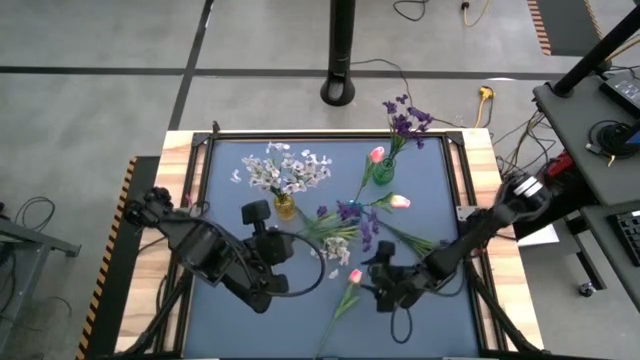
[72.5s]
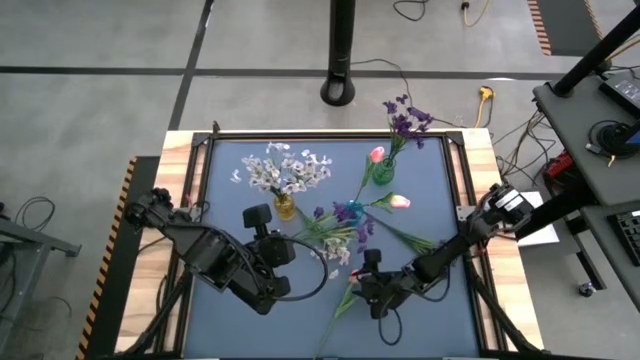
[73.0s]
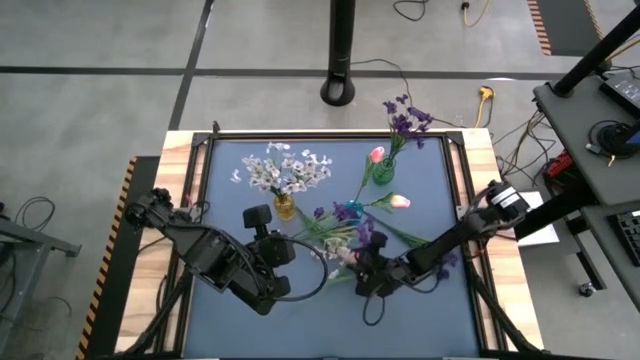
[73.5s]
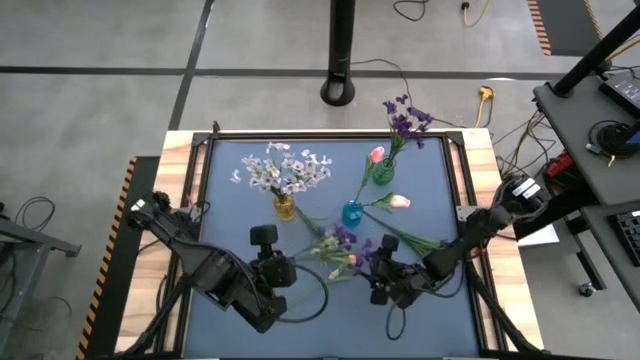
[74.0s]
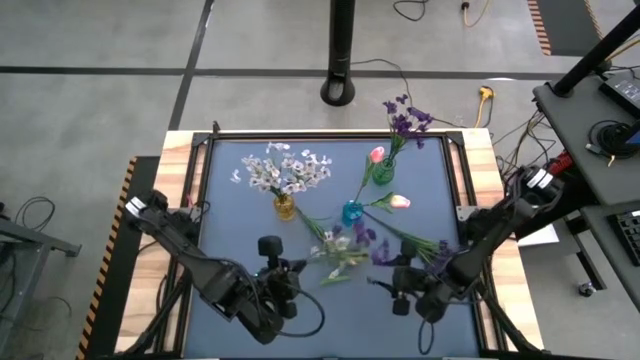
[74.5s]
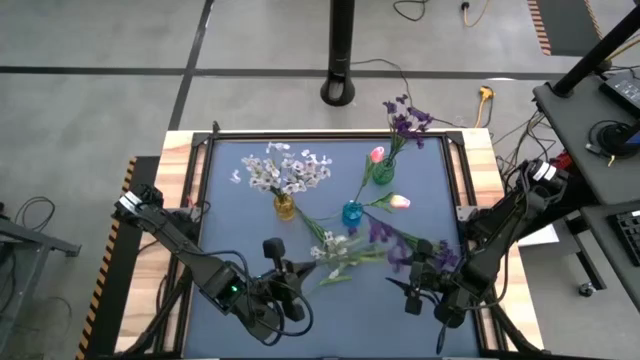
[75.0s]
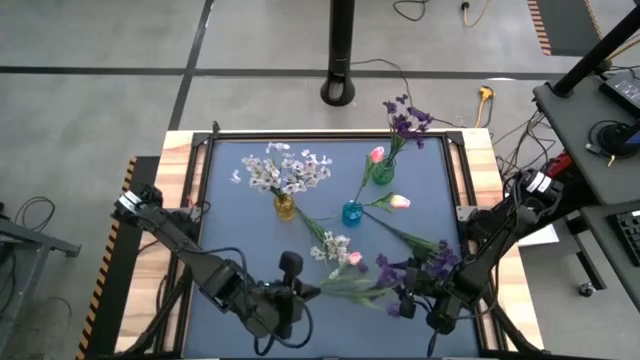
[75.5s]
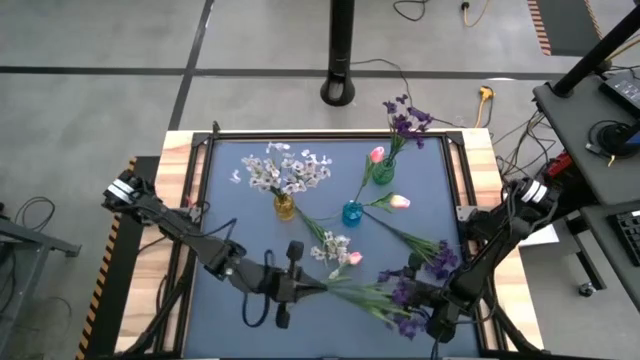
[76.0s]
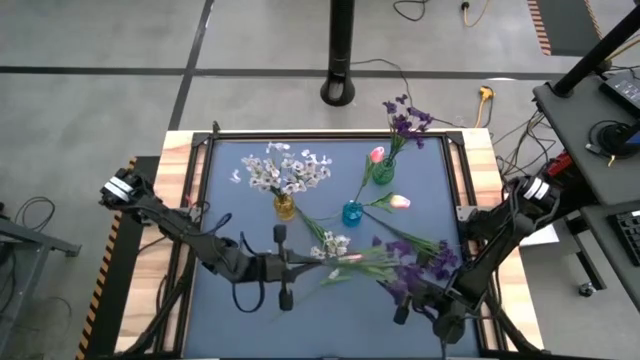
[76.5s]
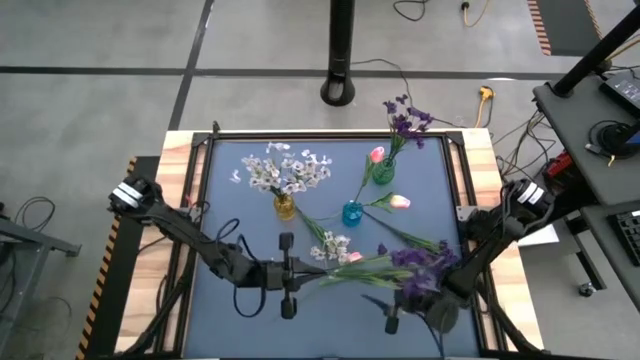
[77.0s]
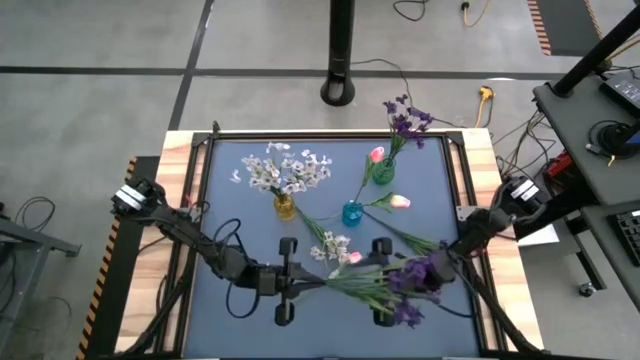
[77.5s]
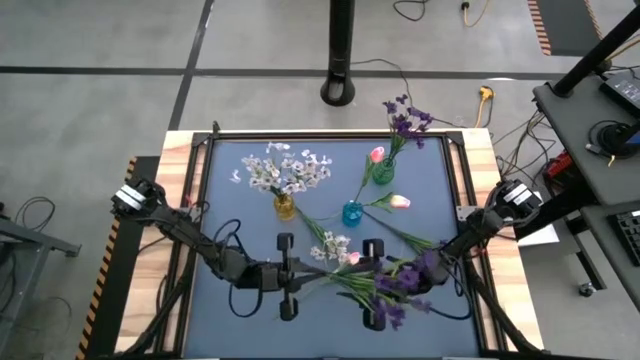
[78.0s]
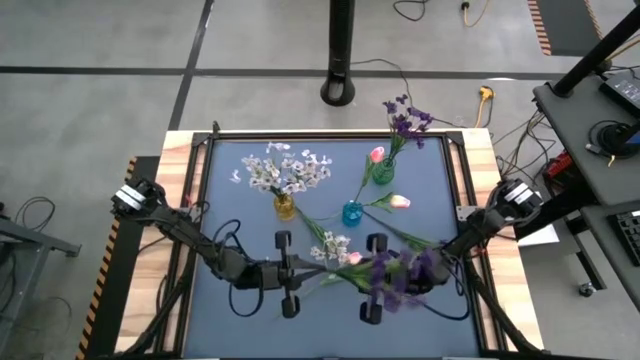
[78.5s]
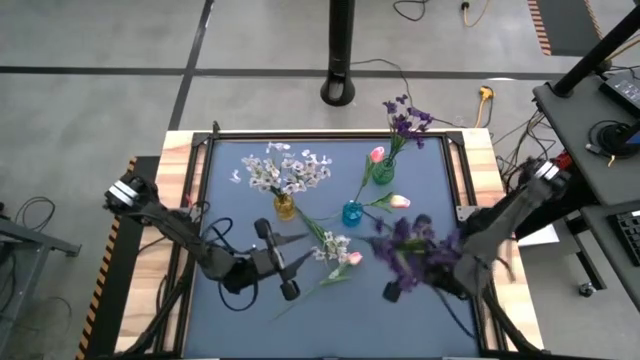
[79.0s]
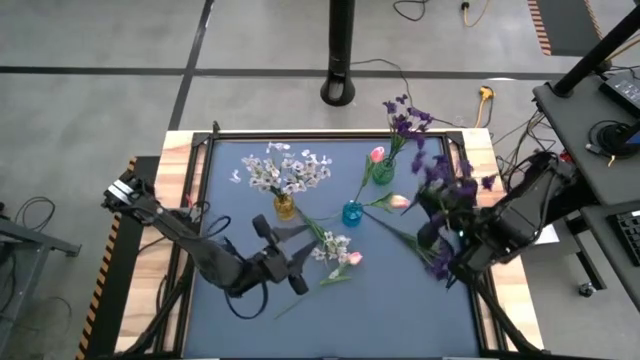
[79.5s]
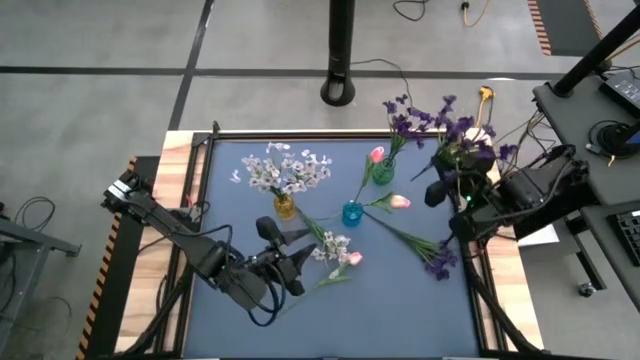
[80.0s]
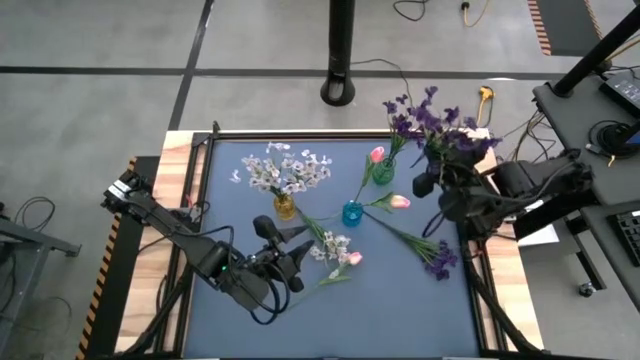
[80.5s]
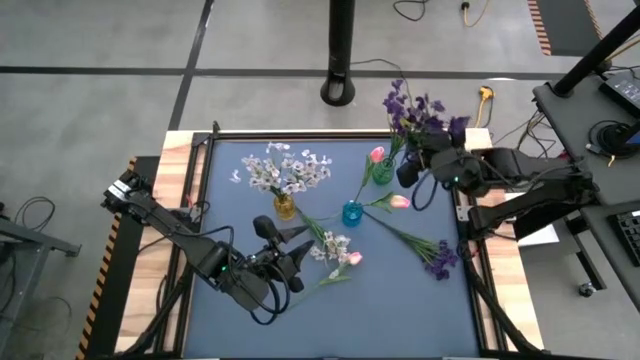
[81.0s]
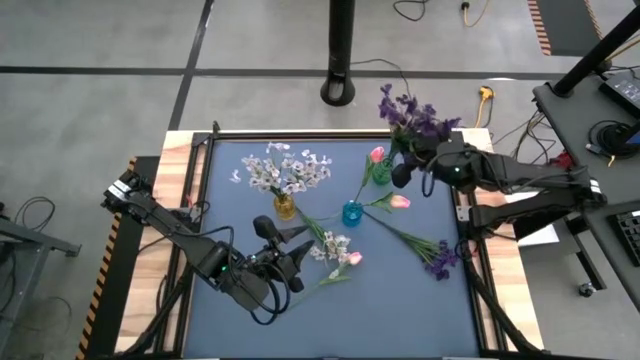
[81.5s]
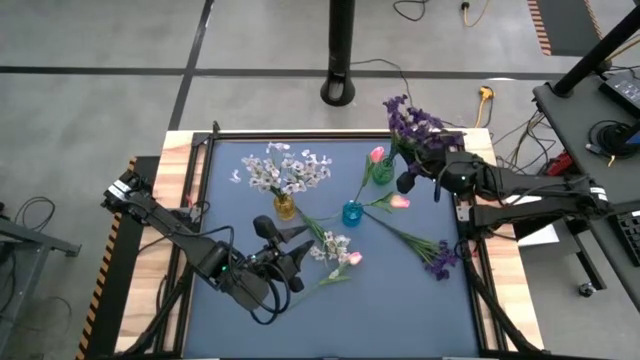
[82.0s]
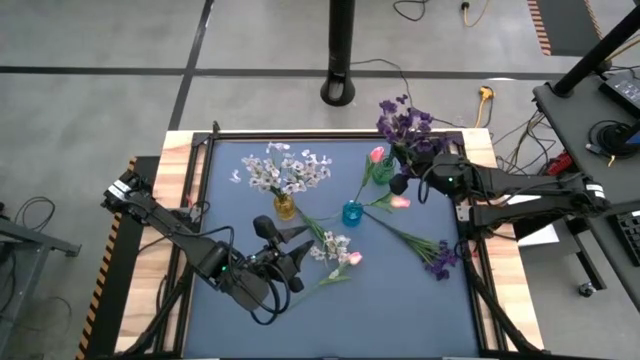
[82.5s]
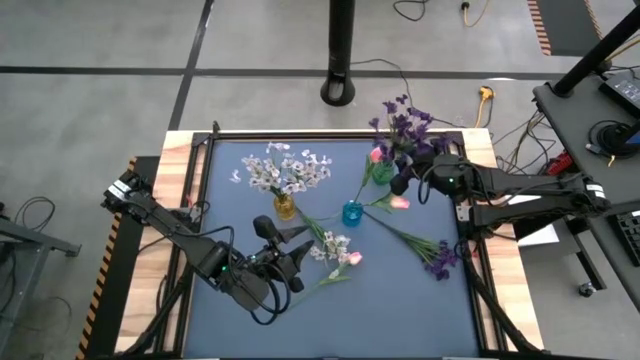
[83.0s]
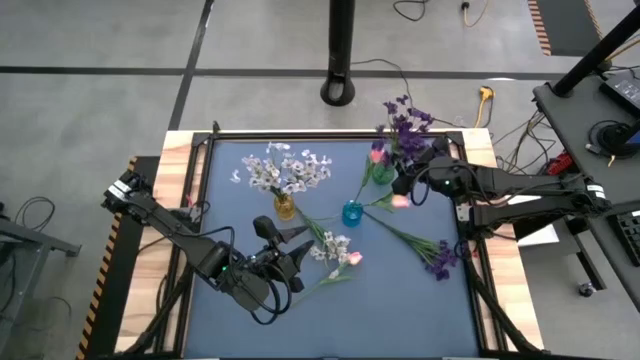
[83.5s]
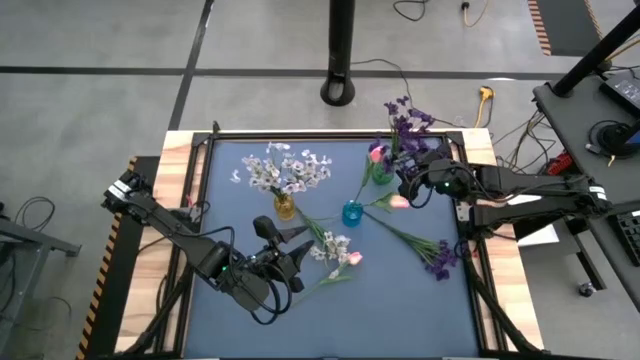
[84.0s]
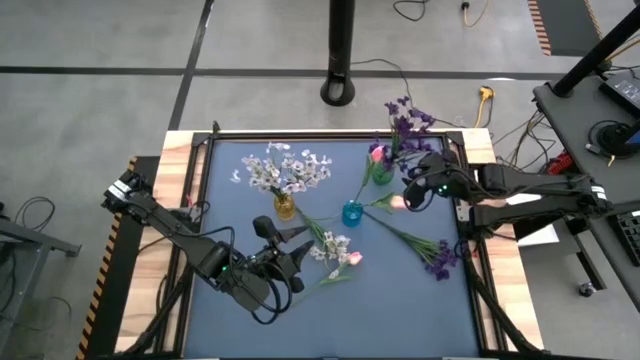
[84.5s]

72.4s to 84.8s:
Task: Sort flowers into vase by color
Put the top violet flowers into the green flower vase

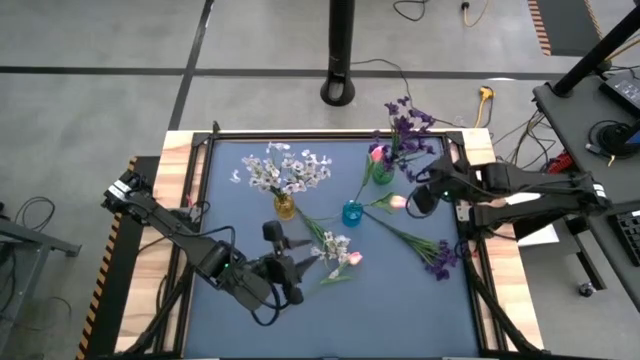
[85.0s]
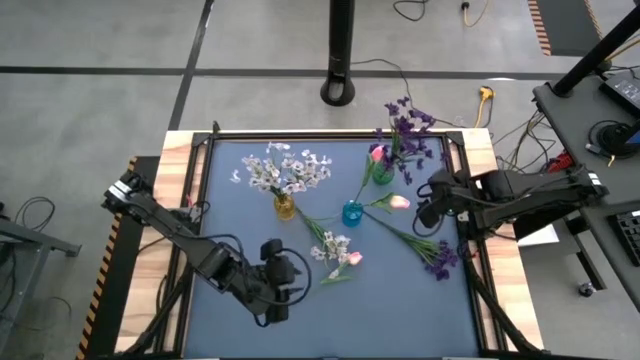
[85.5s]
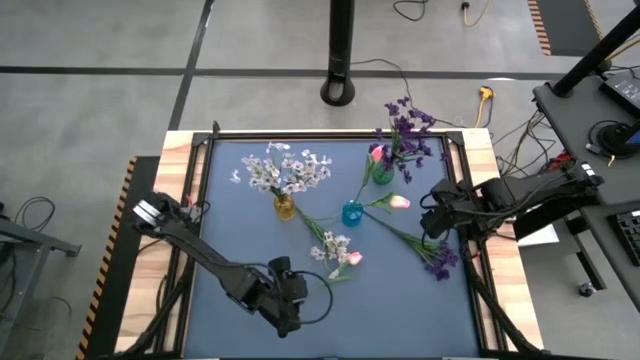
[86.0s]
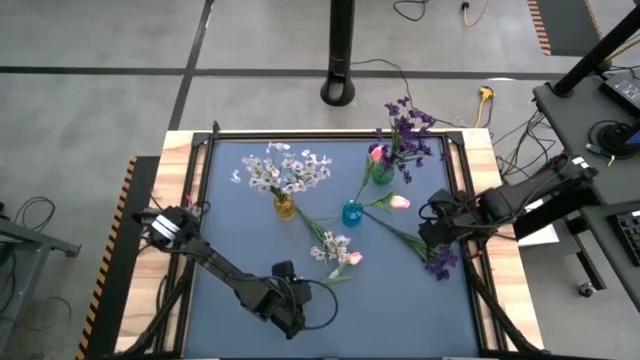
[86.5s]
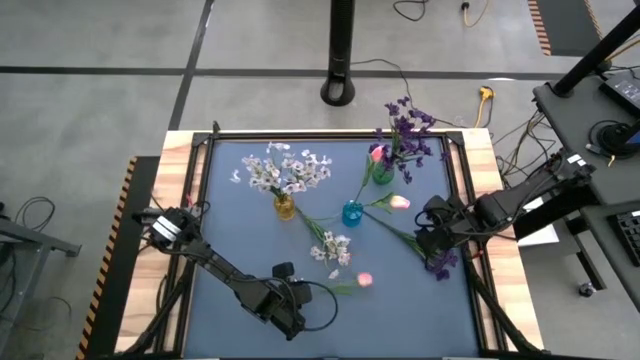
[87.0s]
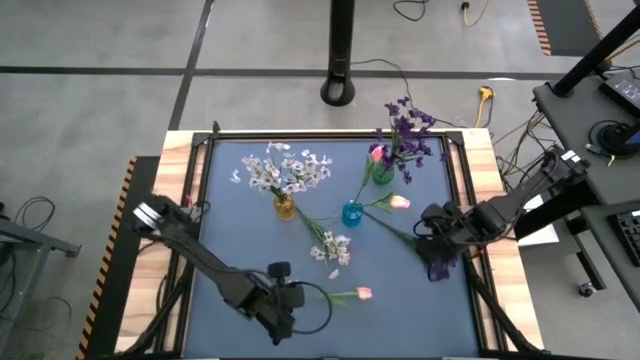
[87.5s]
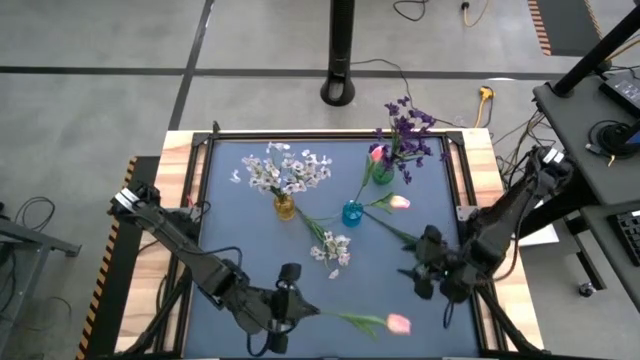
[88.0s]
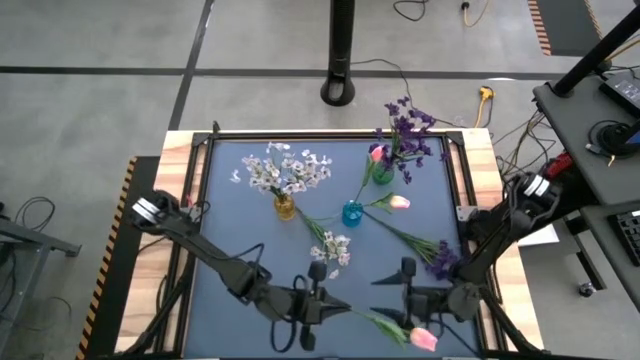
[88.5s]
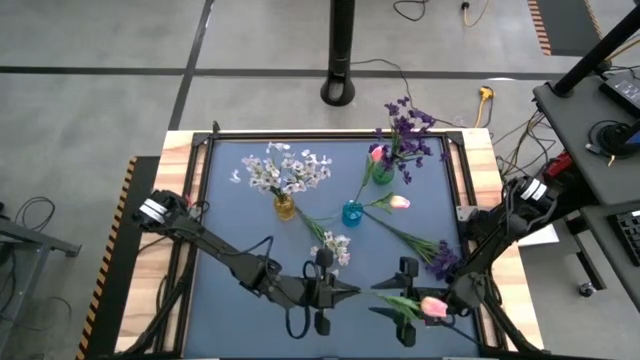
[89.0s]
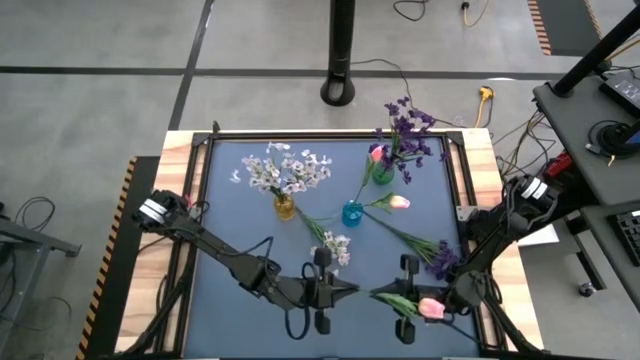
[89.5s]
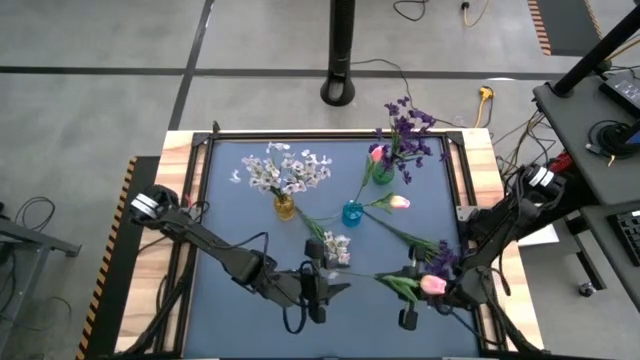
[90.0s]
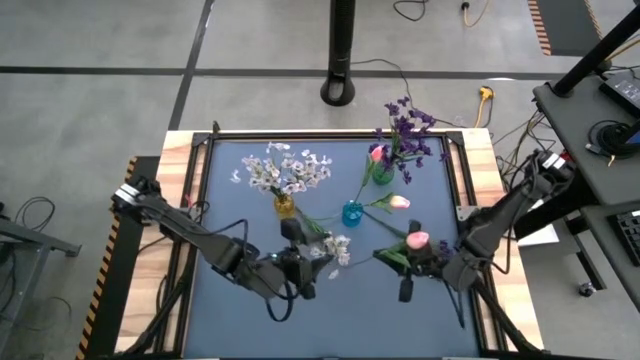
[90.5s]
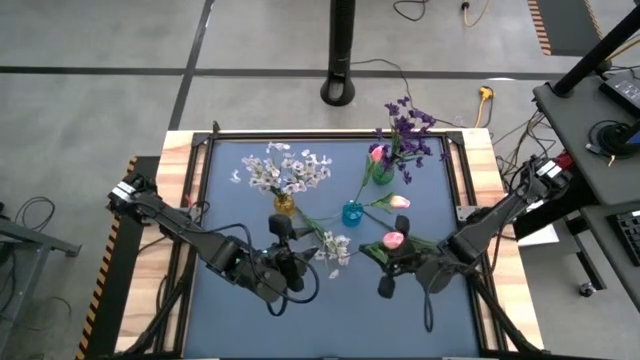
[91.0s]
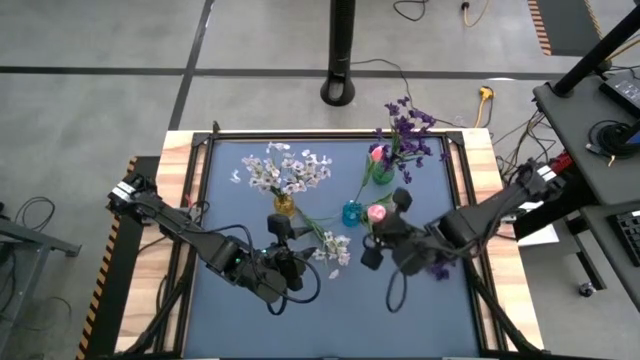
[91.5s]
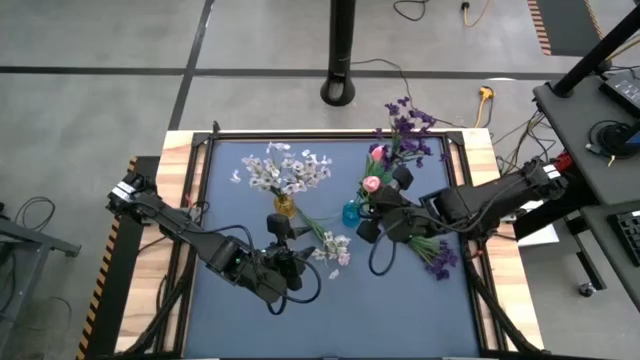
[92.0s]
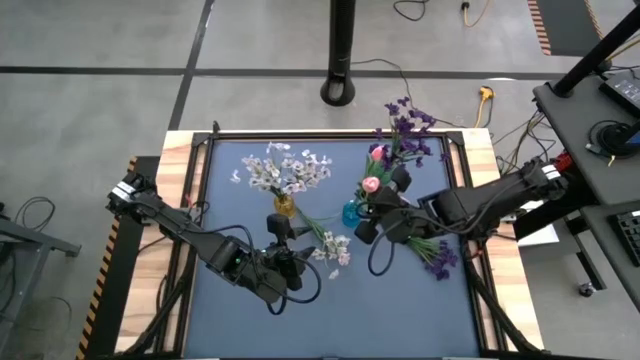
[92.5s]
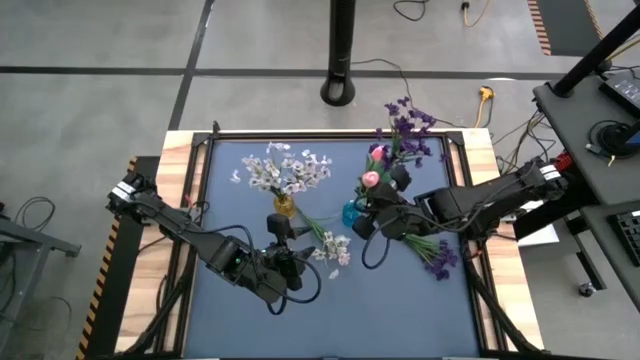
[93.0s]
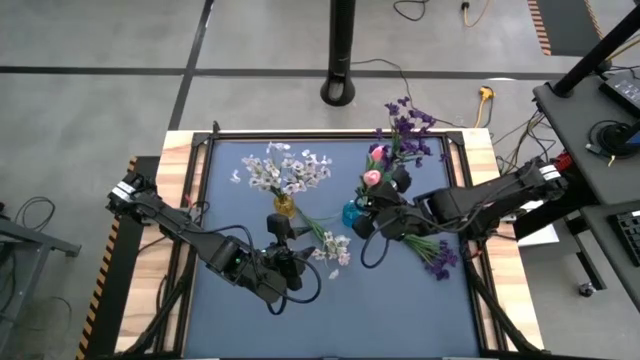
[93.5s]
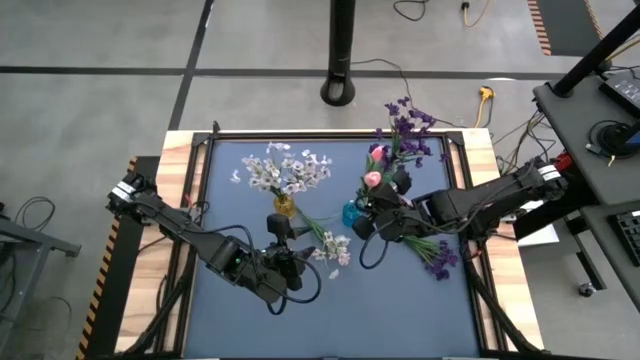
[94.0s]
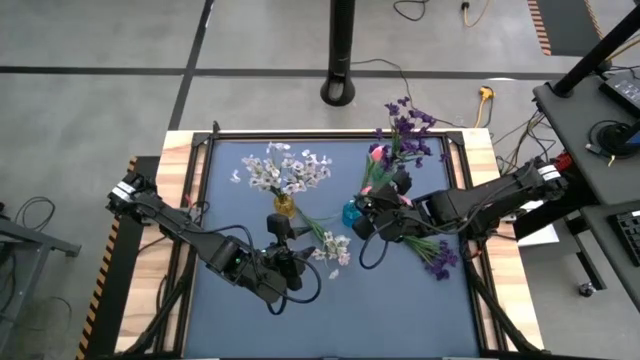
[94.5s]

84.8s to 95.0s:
Put the pink tulip into the blue flower vase
